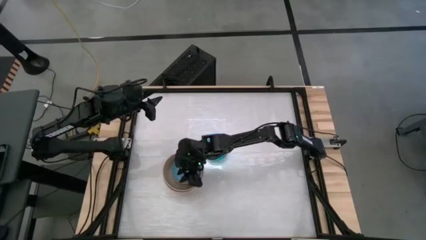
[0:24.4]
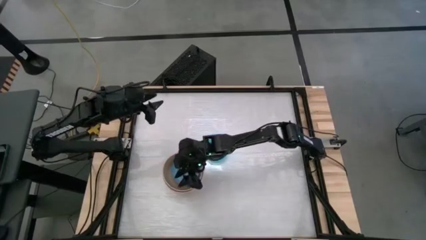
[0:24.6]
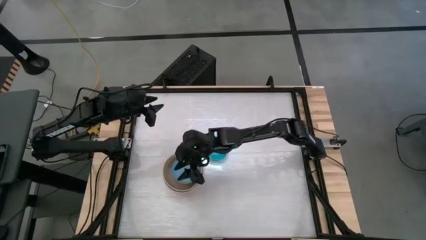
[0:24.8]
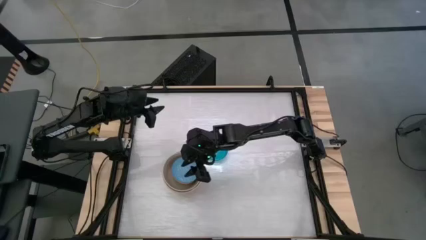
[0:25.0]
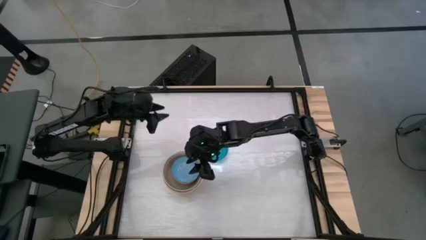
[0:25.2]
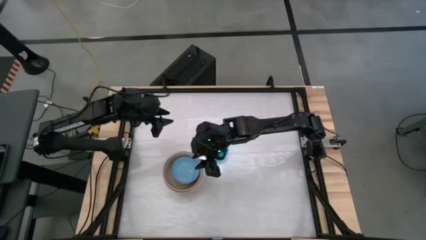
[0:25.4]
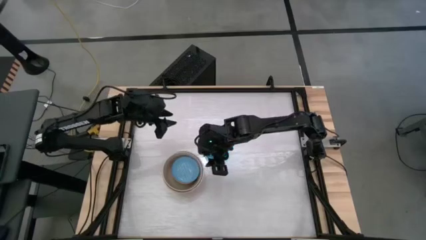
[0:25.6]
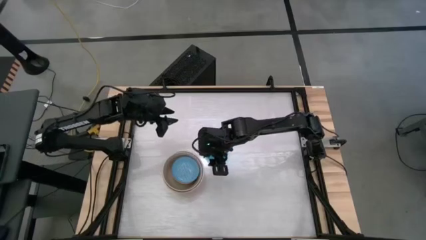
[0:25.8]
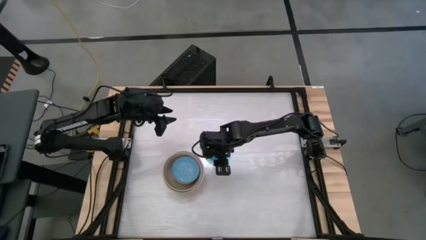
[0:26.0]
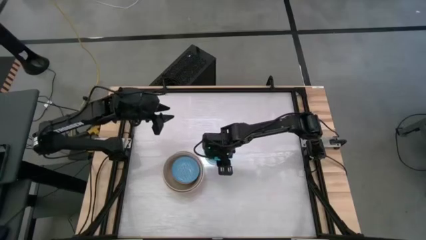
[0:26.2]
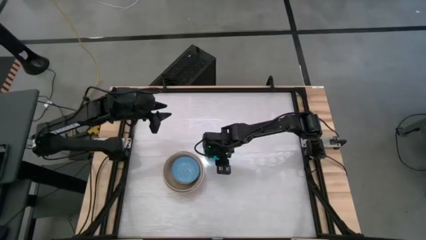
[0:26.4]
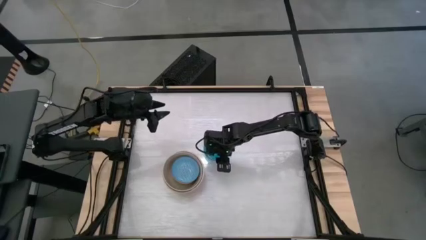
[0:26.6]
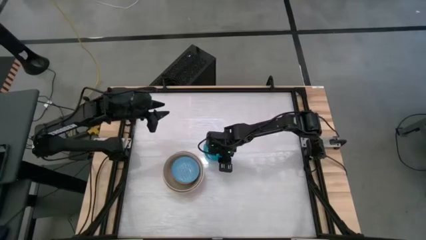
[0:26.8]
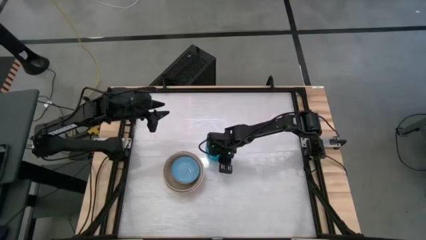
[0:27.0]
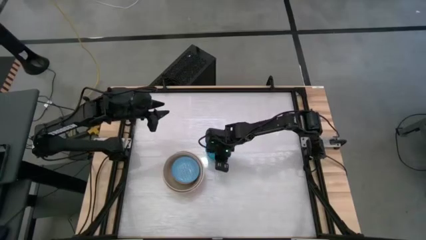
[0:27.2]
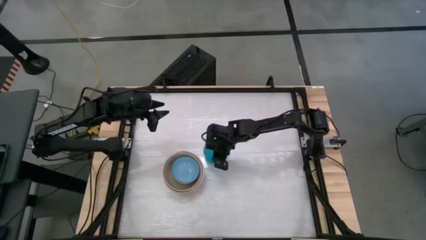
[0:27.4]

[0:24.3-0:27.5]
Stack the blue bowl on top of the patterned blue bowl

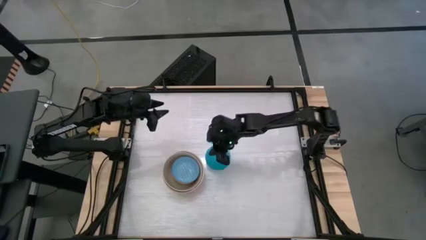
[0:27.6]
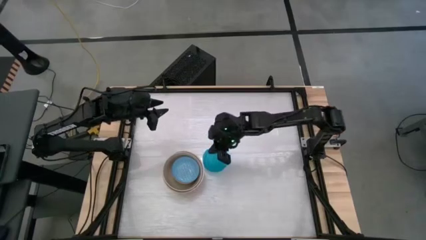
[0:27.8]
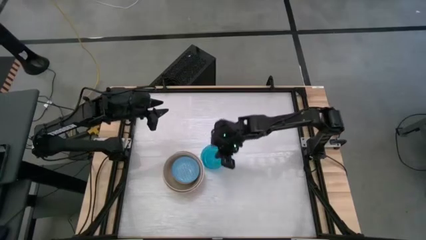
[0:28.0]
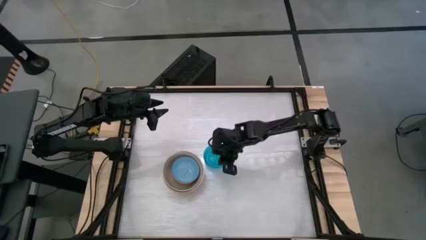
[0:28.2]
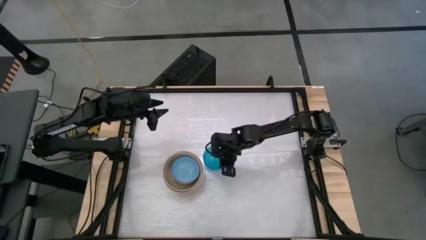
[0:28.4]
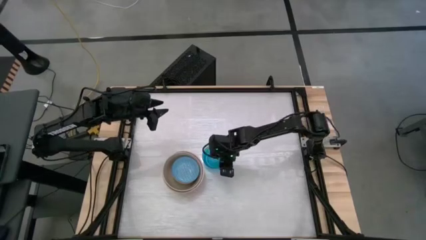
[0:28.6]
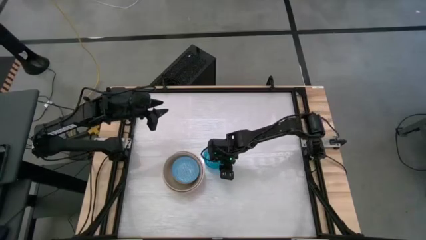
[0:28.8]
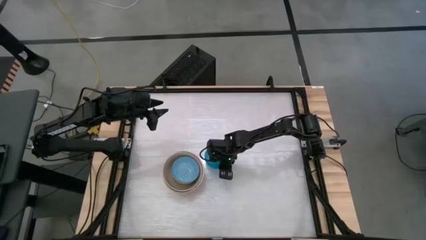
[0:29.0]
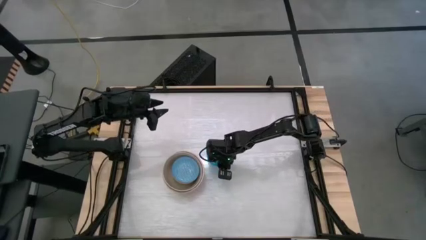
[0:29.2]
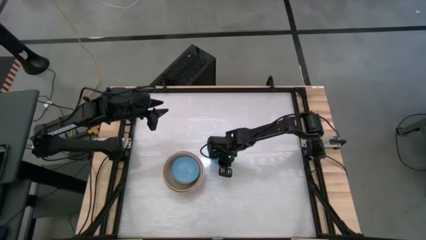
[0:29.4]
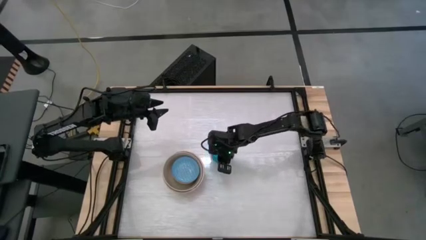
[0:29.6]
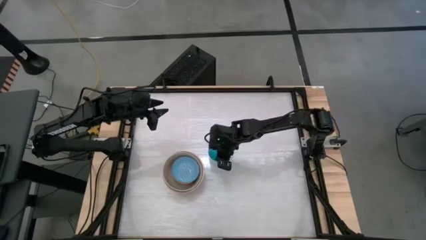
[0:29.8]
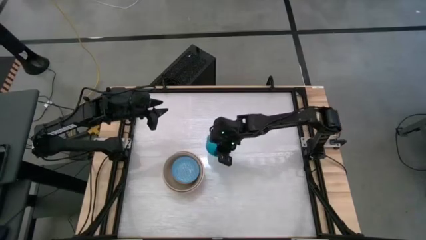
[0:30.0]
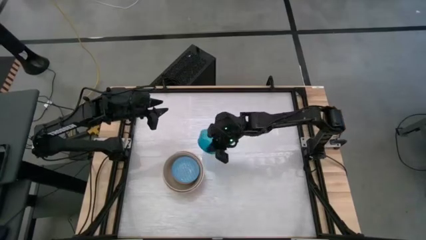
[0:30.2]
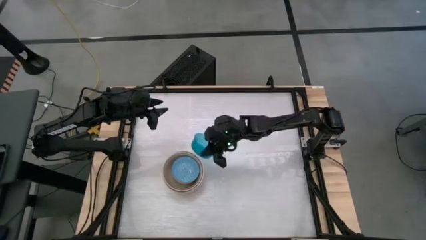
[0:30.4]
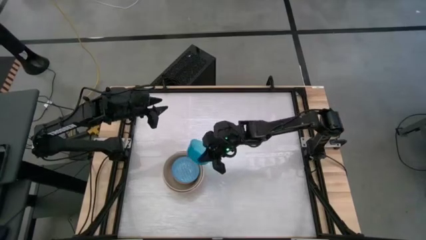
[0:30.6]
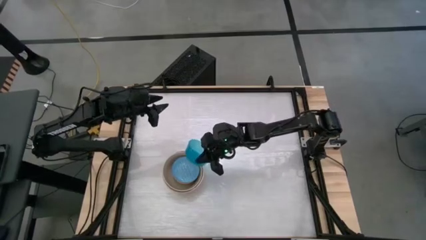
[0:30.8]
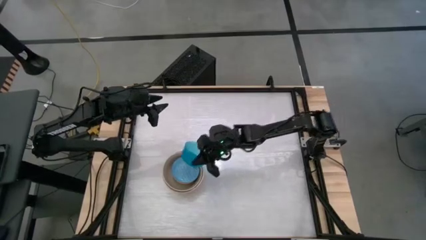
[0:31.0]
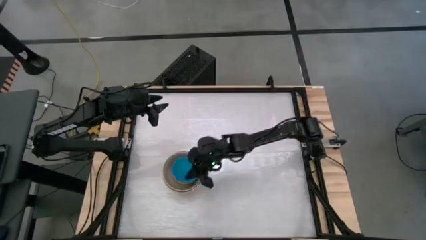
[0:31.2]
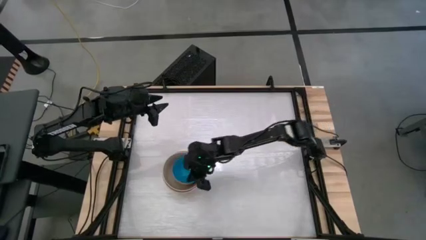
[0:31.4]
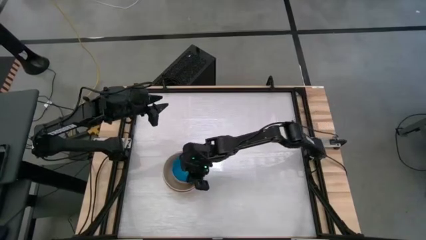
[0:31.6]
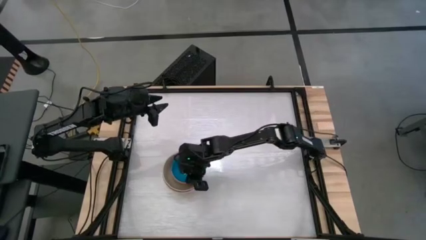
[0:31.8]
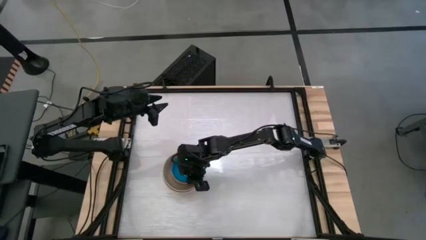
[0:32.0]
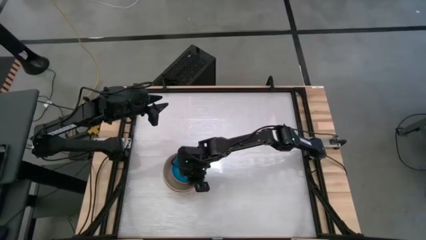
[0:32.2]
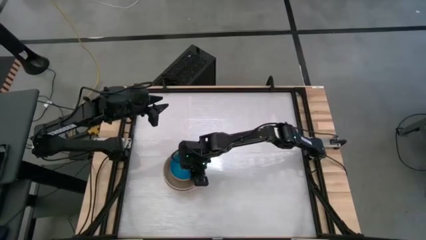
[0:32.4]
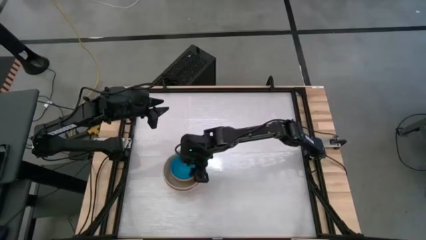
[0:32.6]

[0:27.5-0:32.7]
Stack the blue bowl on top of the orange bowl

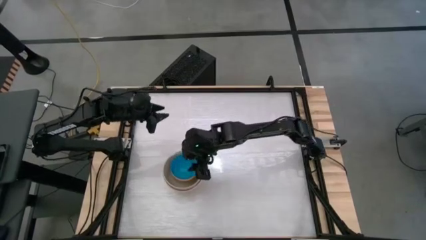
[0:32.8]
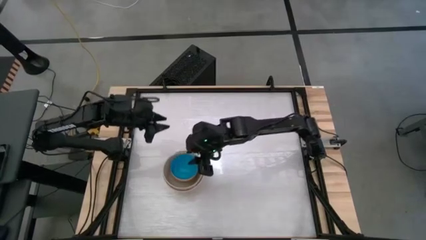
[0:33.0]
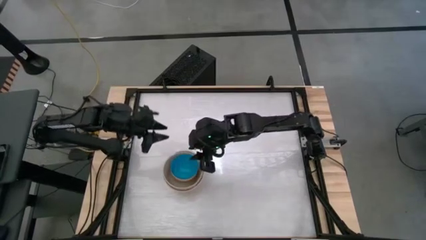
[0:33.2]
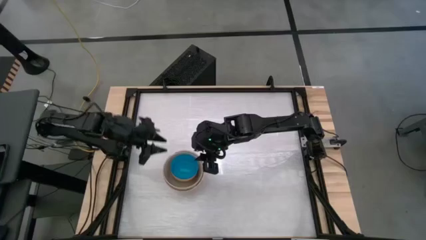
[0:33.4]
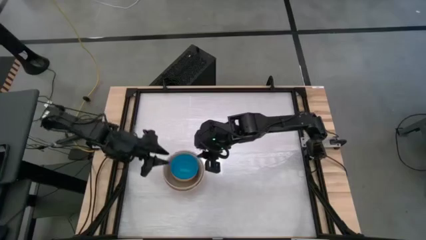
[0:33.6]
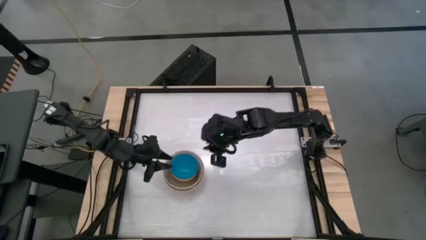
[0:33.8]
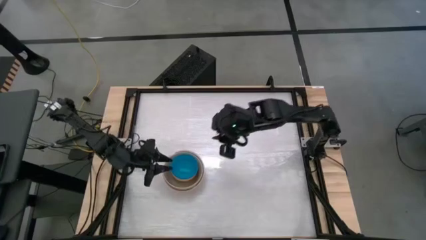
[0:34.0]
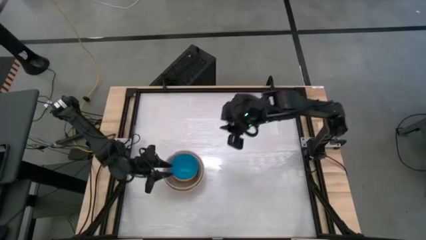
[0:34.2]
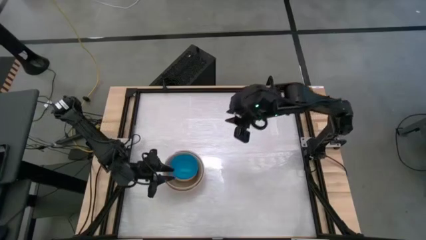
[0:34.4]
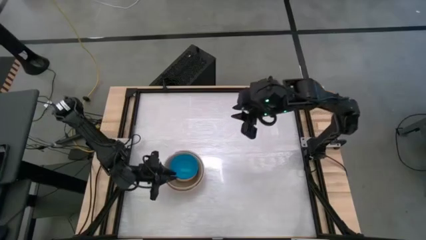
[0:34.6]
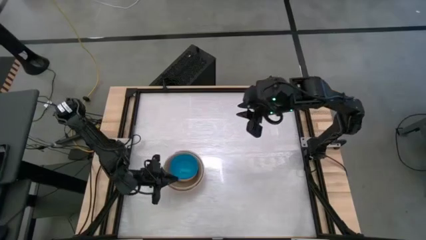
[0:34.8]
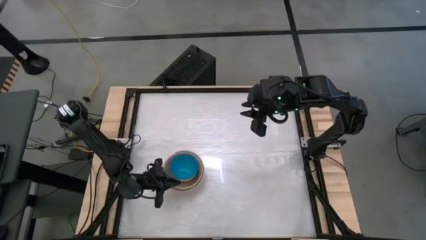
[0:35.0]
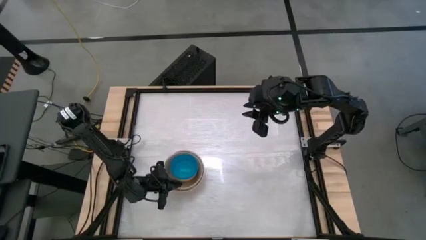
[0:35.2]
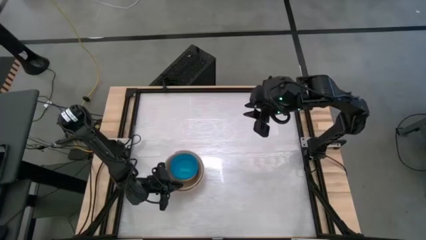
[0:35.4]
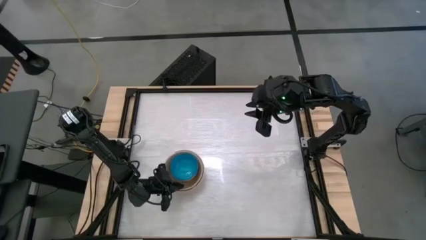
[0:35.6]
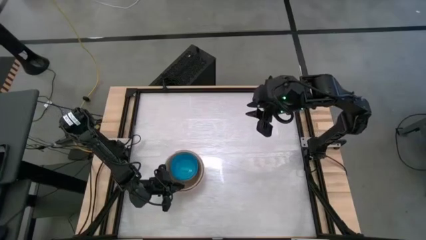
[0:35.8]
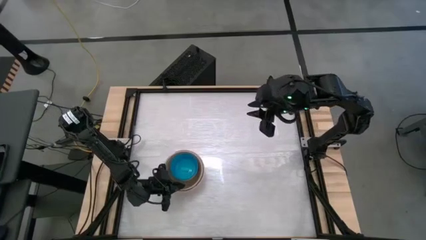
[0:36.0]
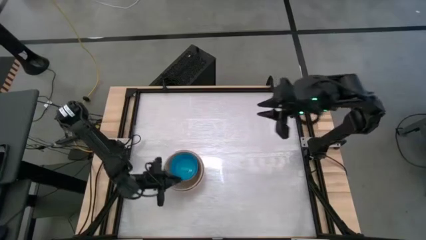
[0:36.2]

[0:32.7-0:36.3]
Adjust the stack bowl

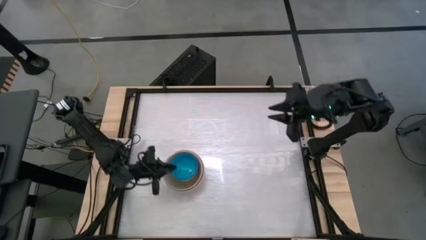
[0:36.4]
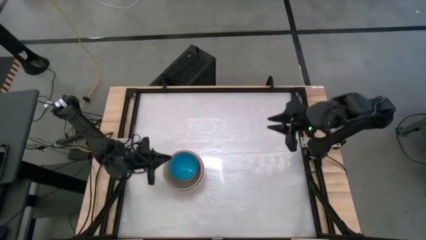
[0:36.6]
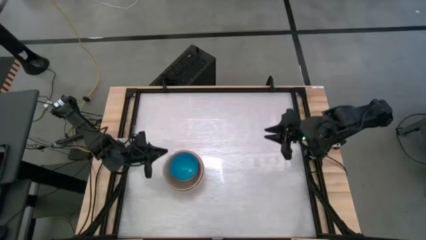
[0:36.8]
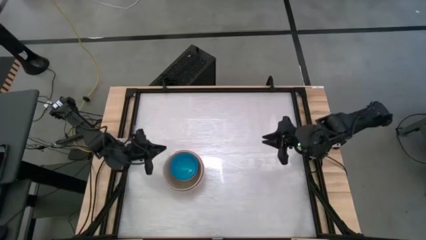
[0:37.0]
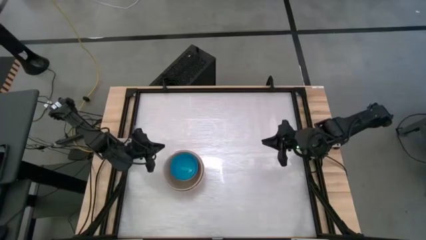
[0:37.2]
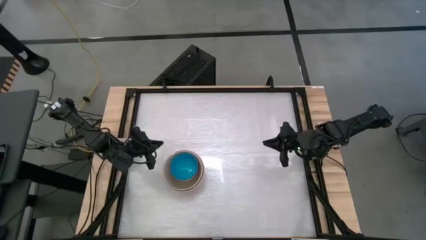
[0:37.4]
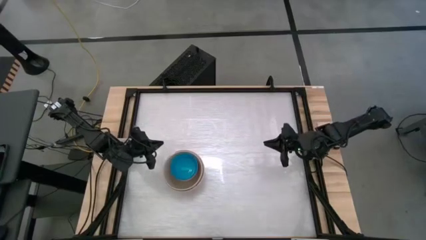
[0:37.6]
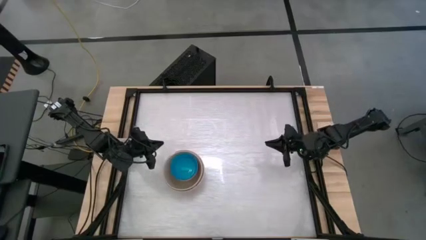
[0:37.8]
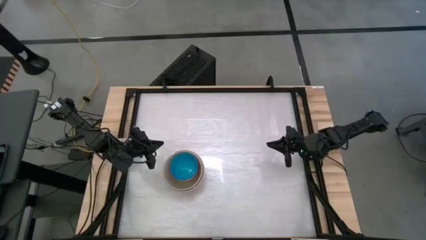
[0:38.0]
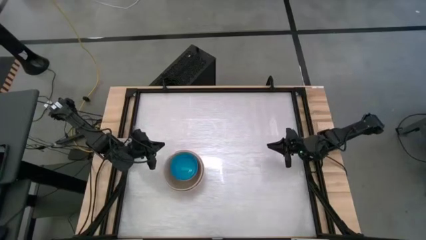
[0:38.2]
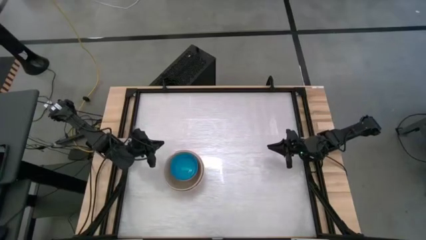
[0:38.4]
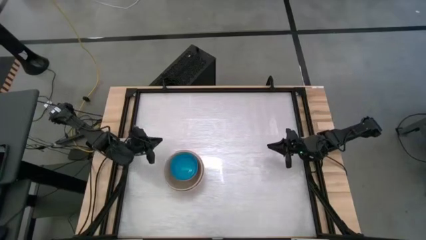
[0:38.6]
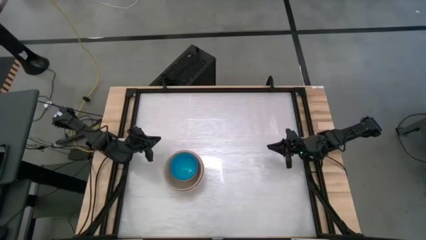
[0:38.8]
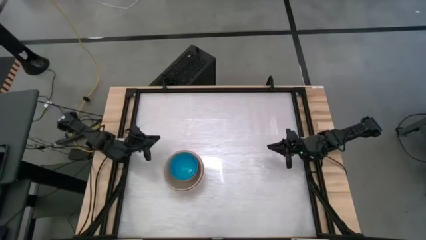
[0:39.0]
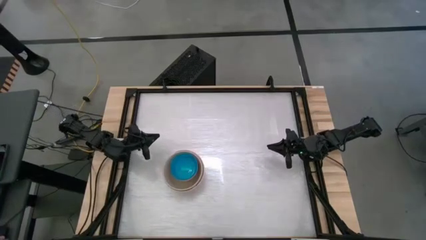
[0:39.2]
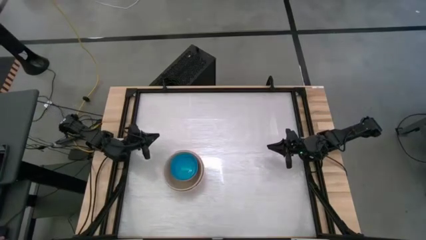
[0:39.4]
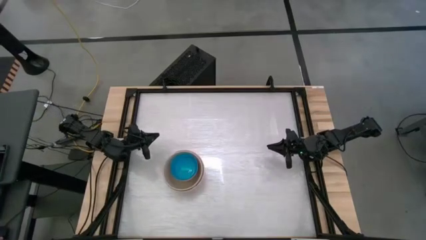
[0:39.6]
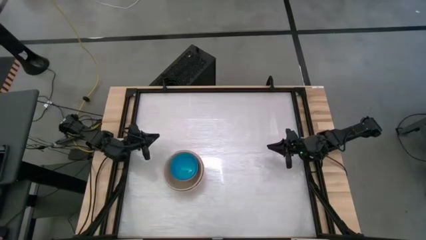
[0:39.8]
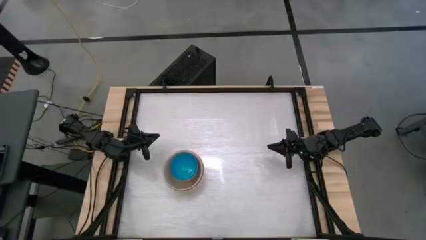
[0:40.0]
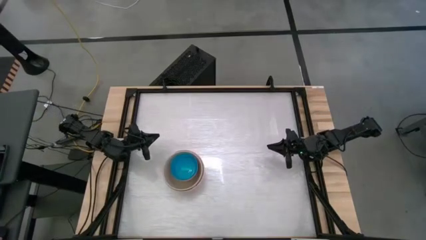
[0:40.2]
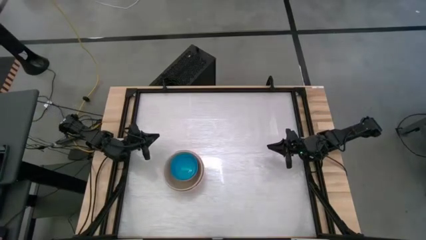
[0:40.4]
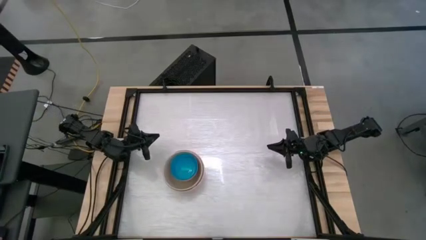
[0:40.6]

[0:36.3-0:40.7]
Return to Home Position
